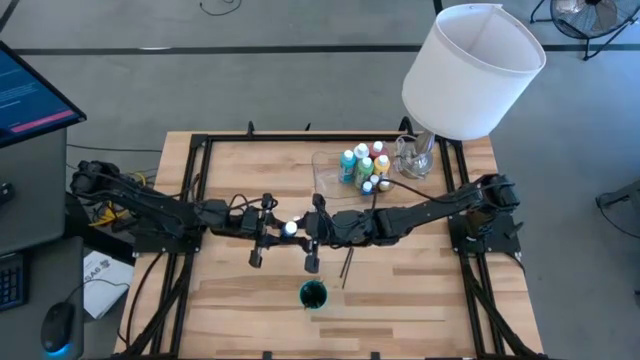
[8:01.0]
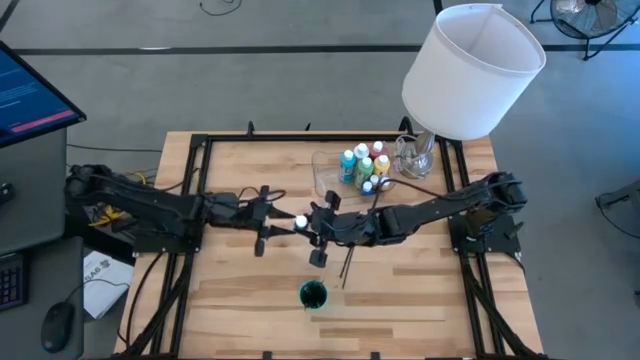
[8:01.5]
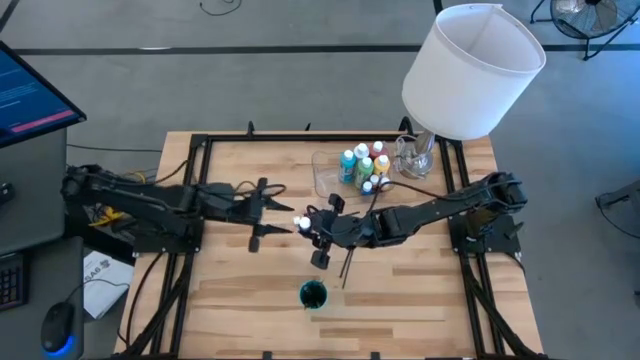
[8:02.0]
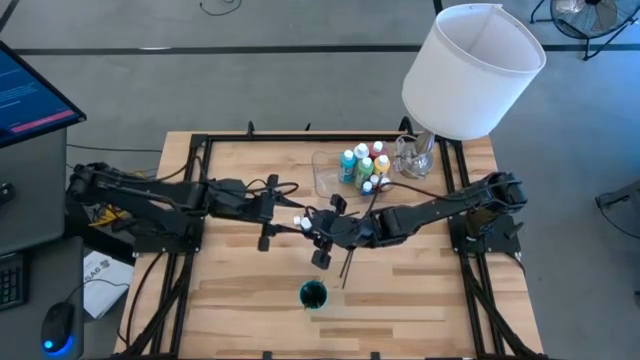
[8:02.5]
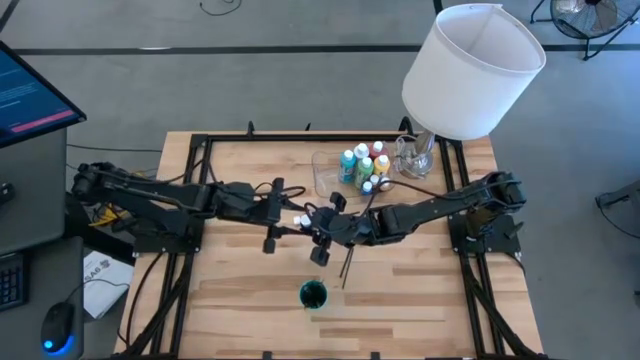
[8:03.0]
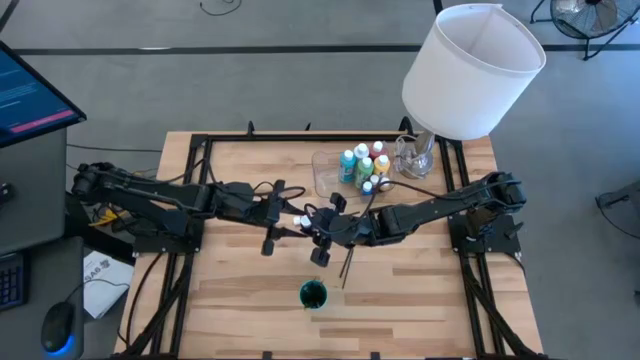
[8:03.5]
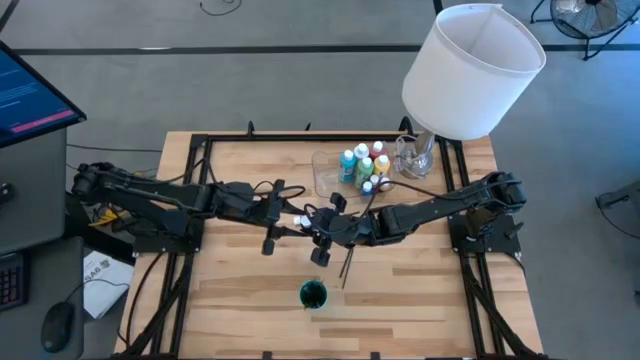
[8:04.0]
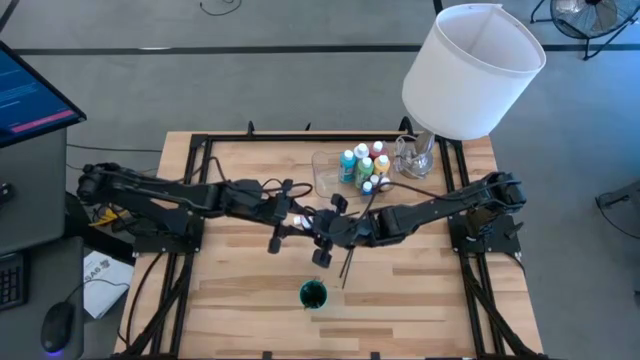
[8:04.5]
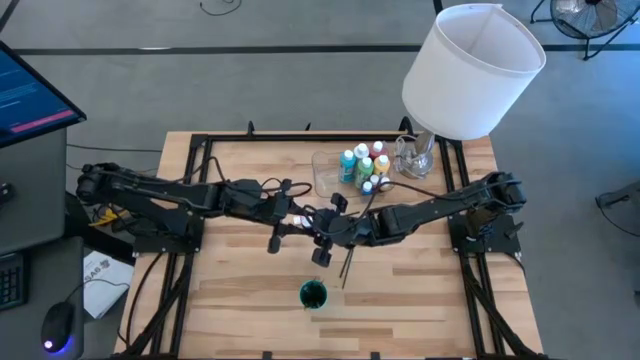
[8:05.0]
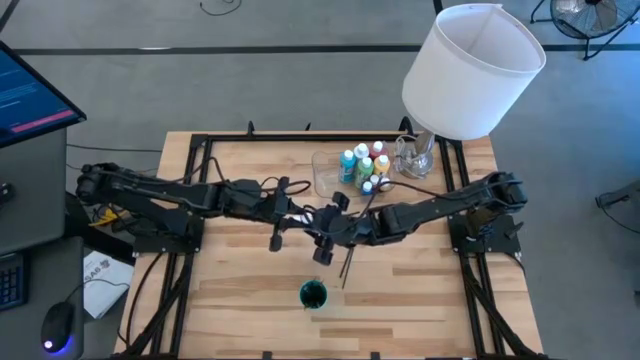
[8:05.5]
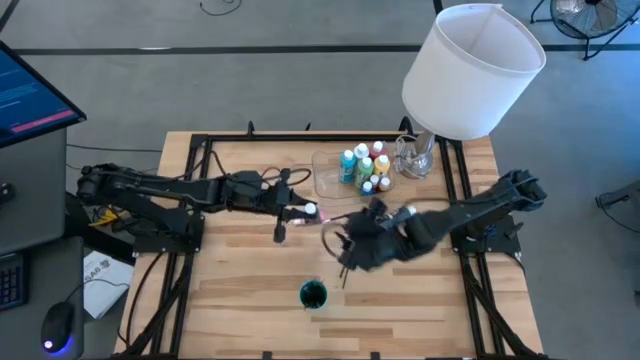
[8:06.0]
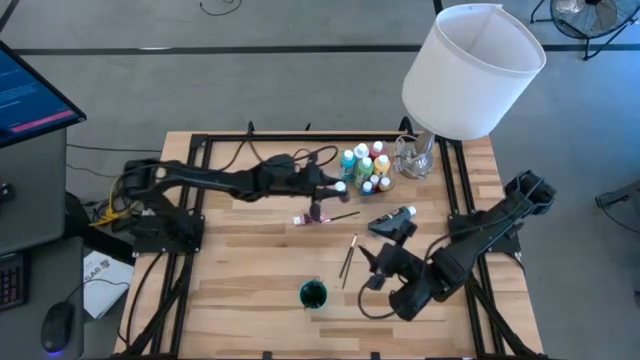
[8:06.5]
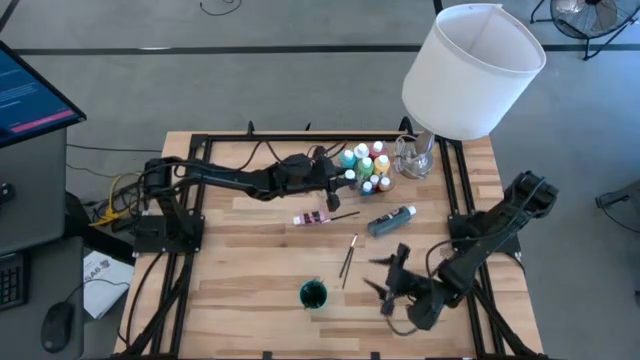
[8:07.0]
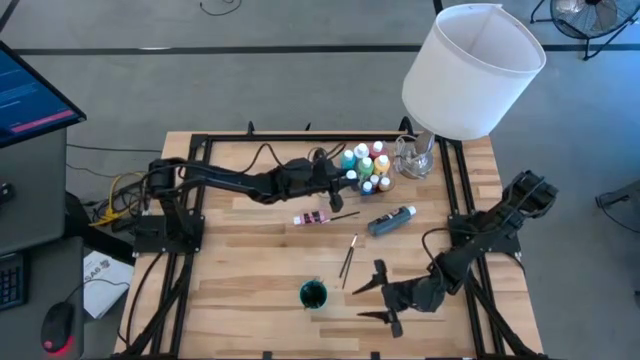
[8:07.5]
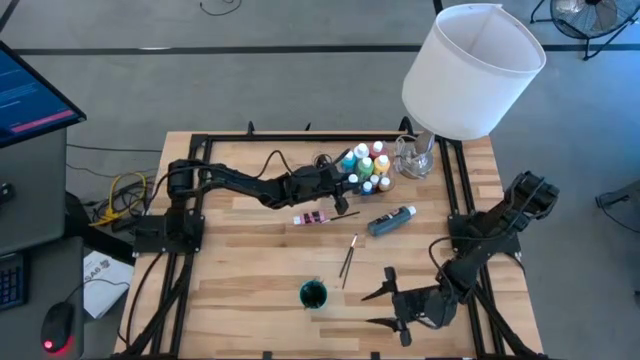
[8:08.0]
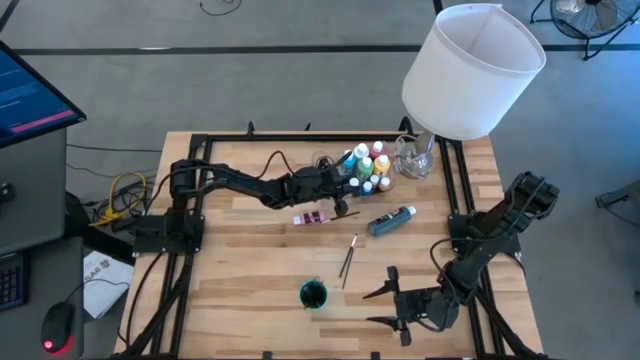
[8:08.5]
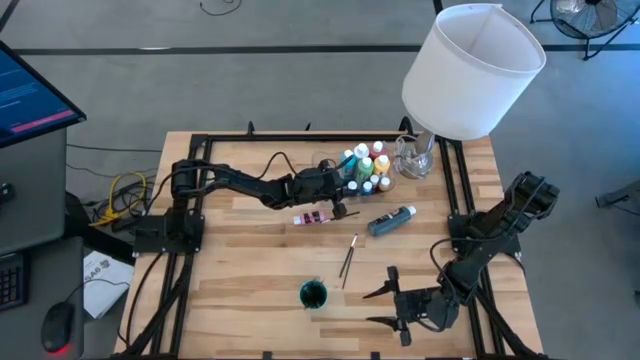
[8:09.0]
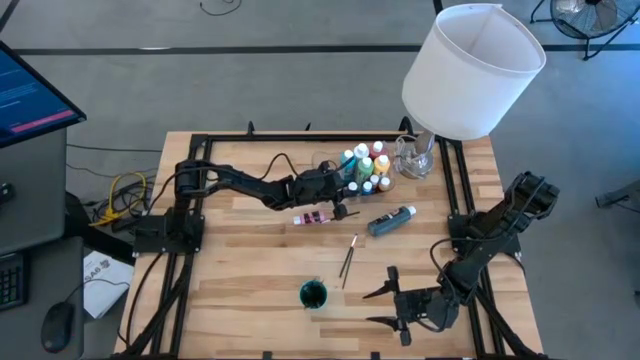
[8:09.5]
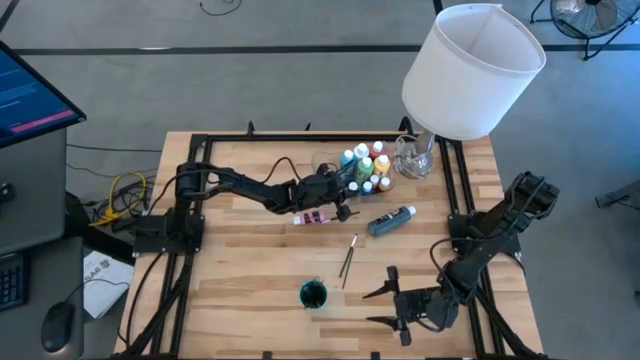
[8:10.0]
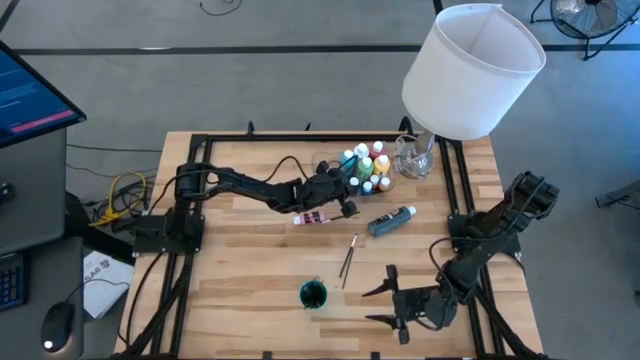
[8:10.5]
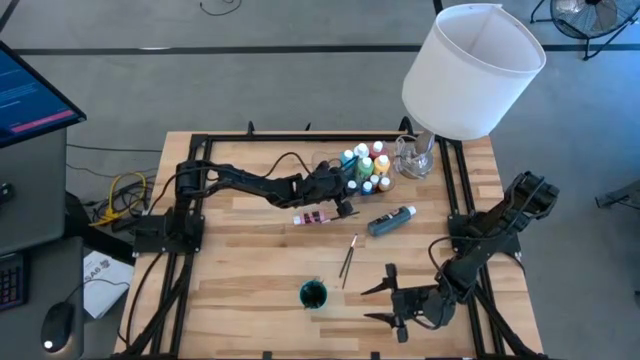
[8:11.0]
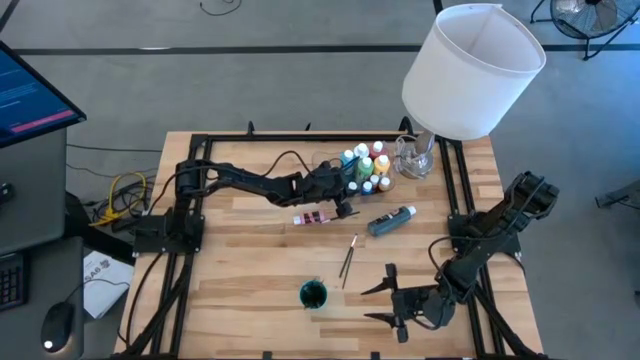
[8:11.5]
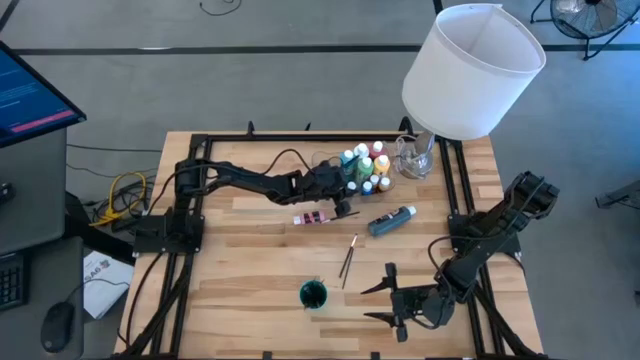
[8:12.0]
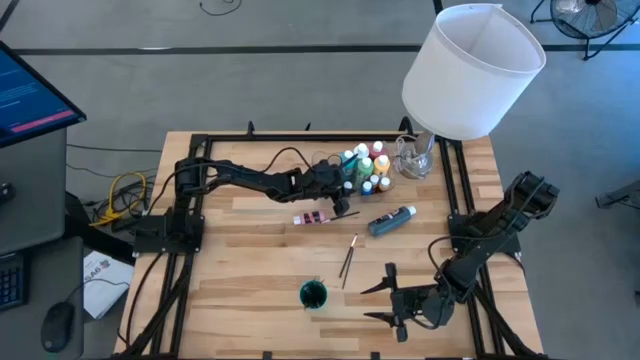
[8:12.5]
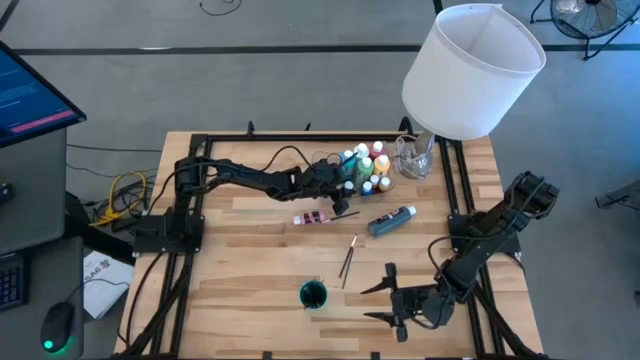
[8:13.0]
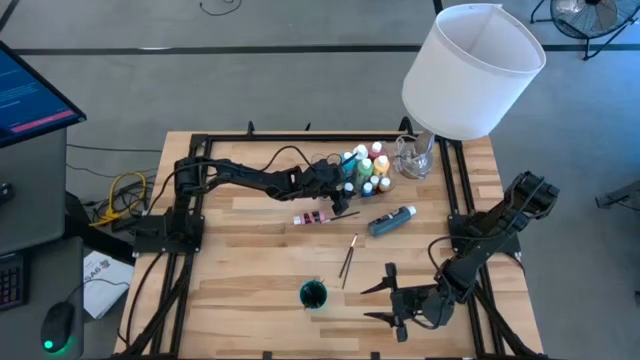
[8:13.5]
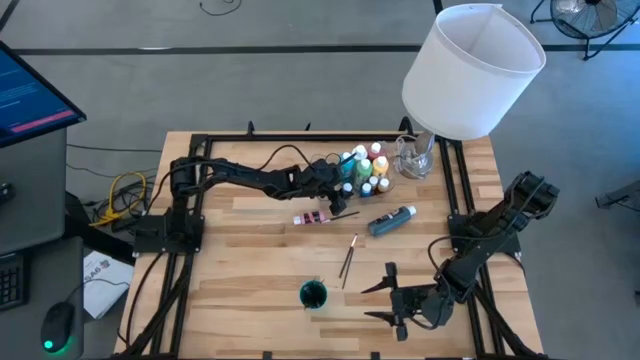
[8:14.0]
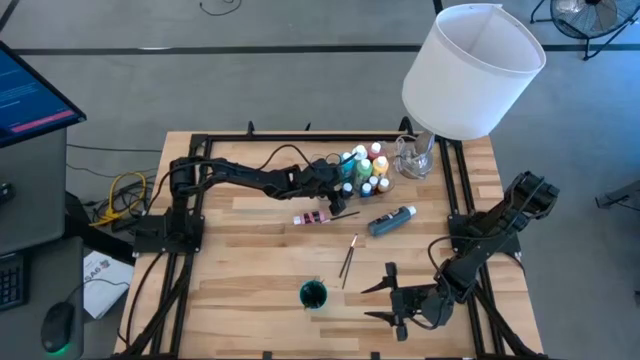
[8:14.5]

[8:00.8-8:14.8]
Task: Pick & Place Paint Supplies
Put the small blue paint bottle into the transparent bin
